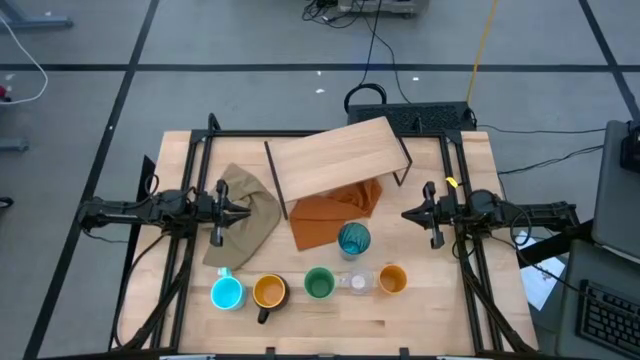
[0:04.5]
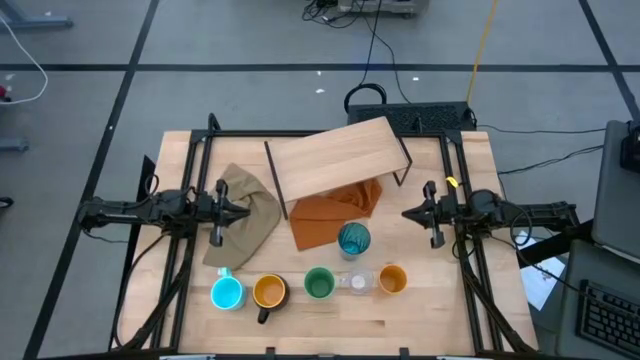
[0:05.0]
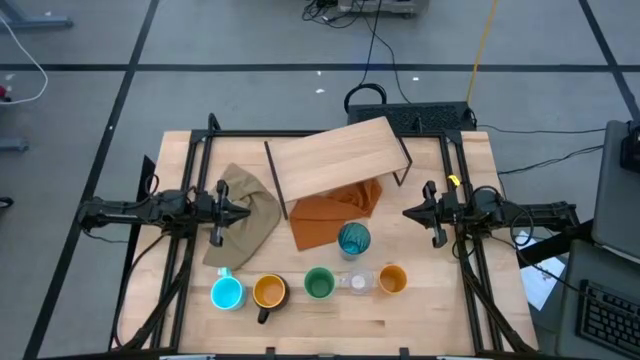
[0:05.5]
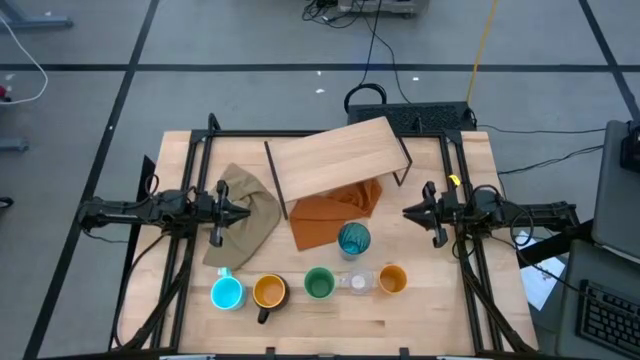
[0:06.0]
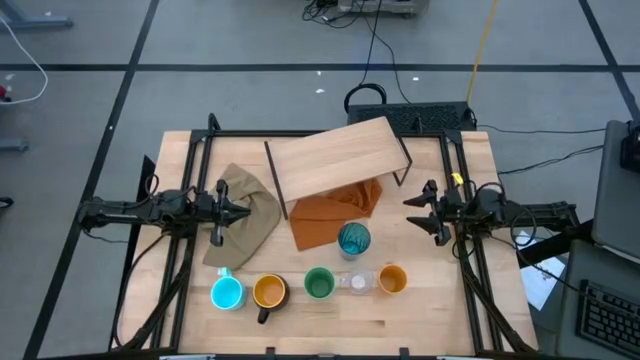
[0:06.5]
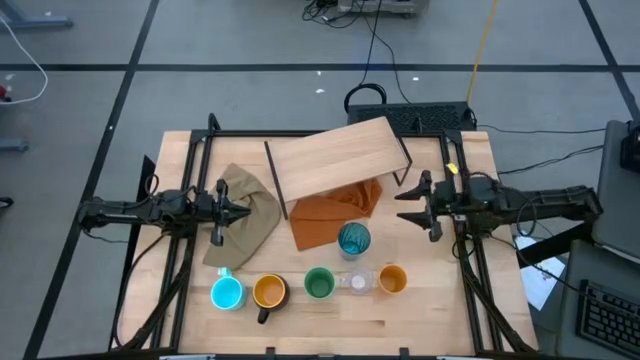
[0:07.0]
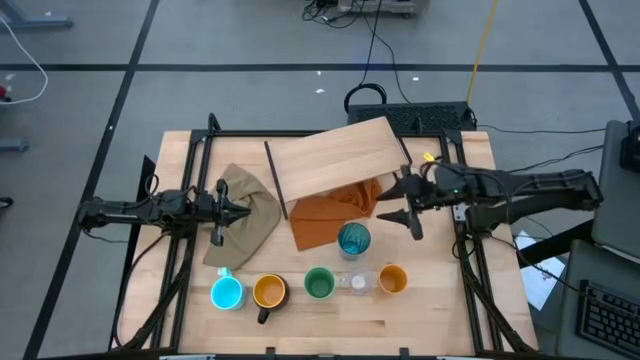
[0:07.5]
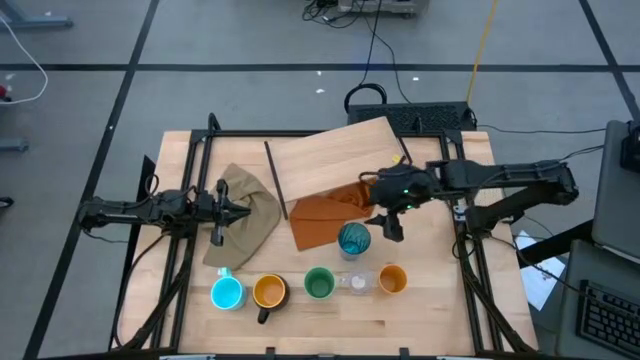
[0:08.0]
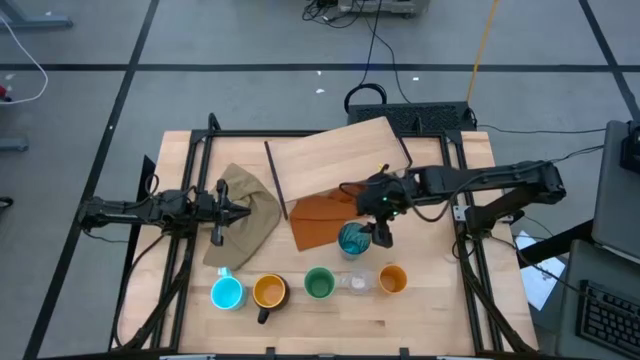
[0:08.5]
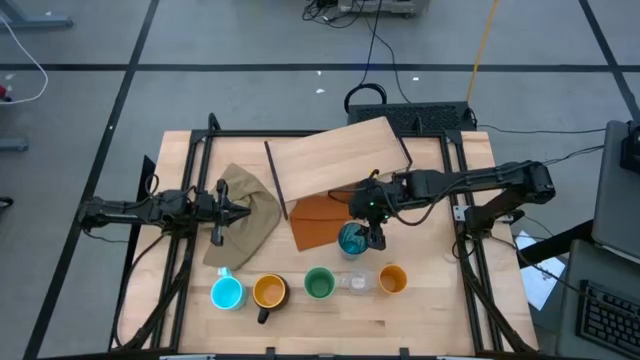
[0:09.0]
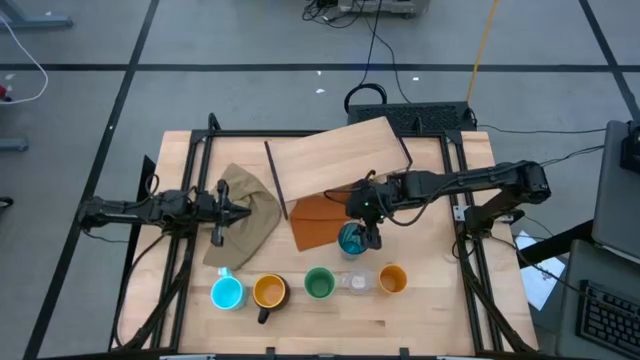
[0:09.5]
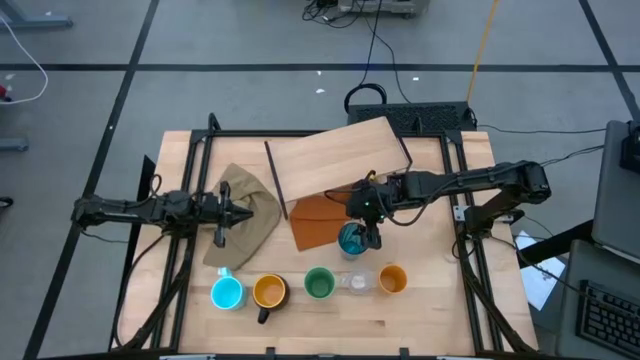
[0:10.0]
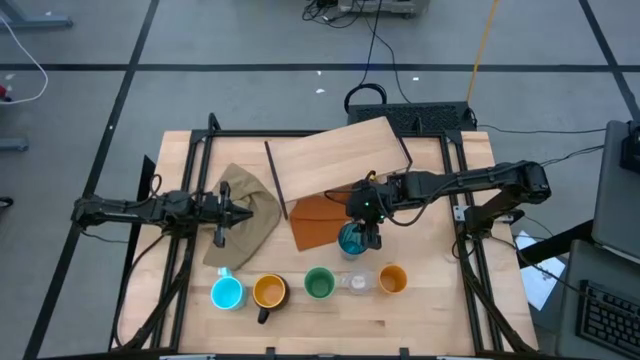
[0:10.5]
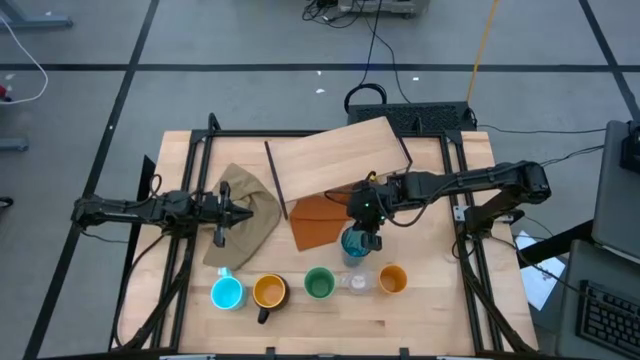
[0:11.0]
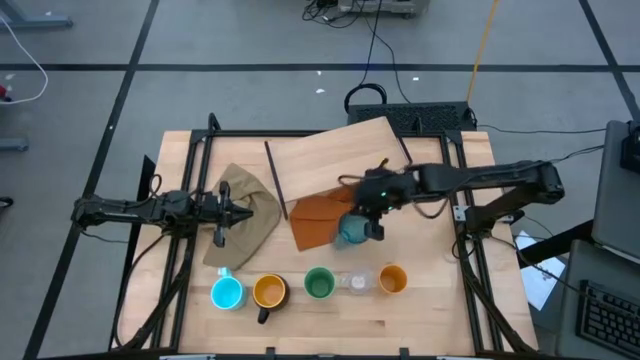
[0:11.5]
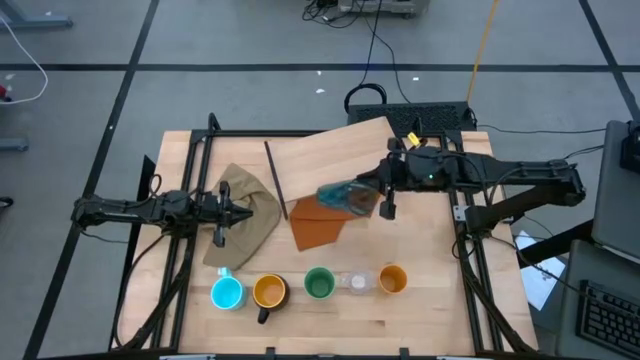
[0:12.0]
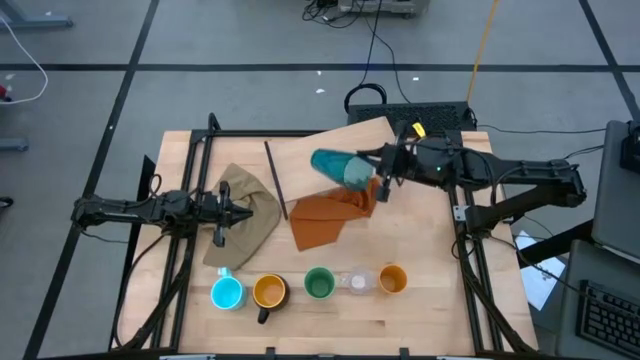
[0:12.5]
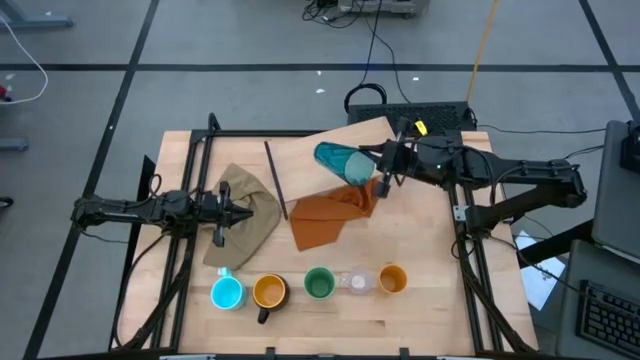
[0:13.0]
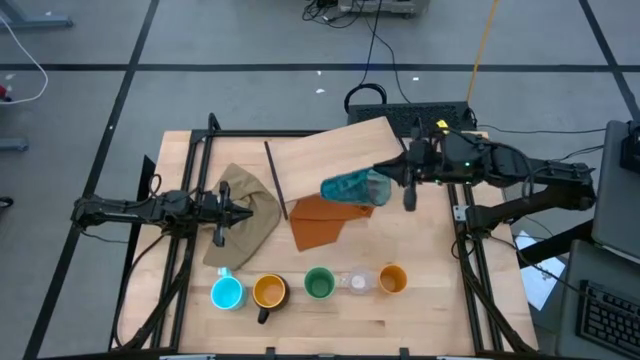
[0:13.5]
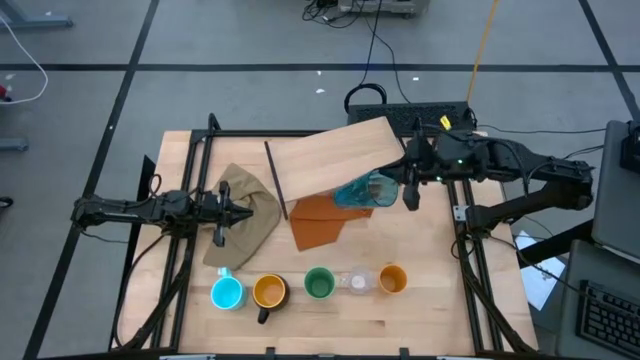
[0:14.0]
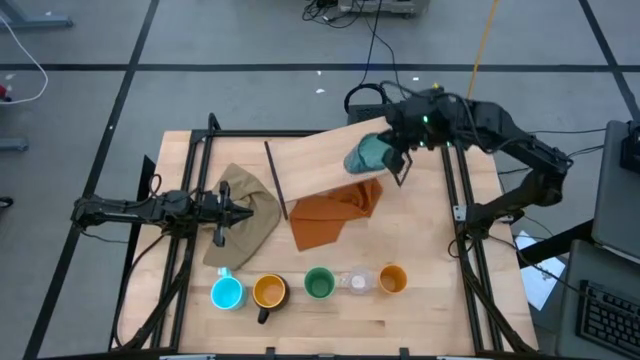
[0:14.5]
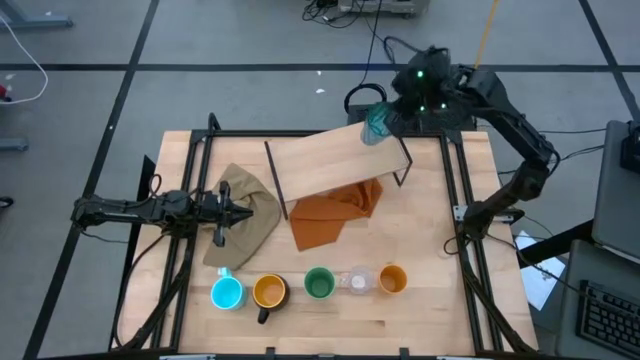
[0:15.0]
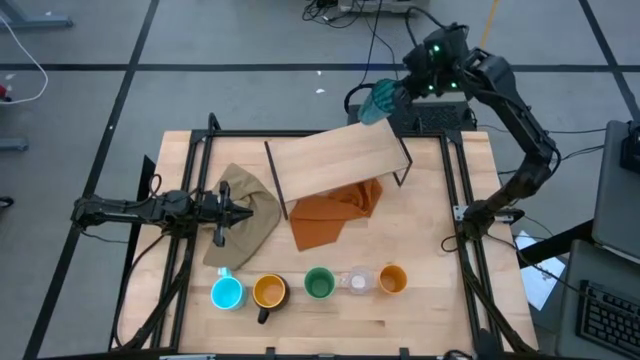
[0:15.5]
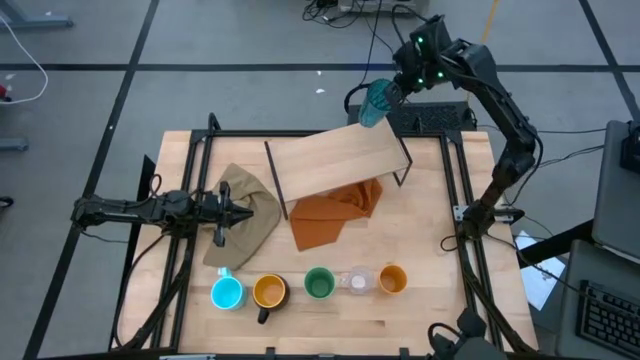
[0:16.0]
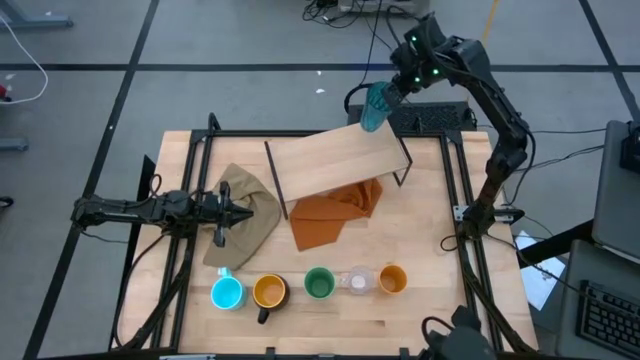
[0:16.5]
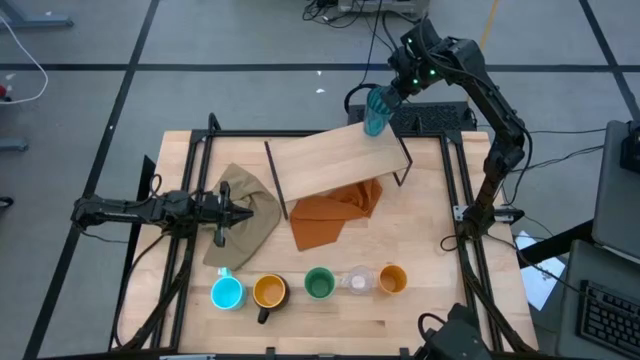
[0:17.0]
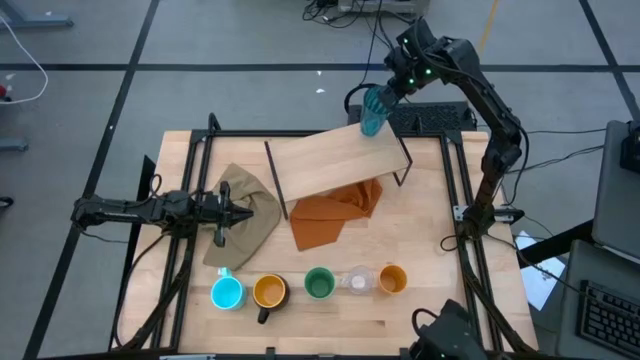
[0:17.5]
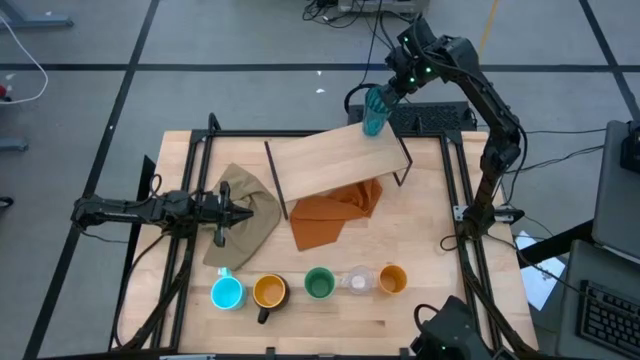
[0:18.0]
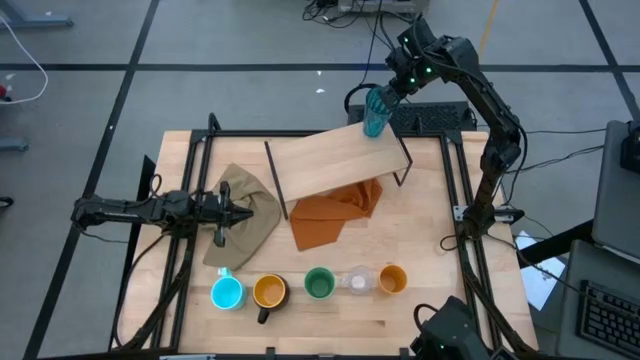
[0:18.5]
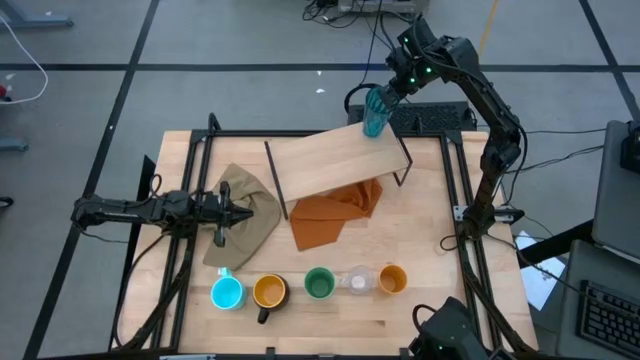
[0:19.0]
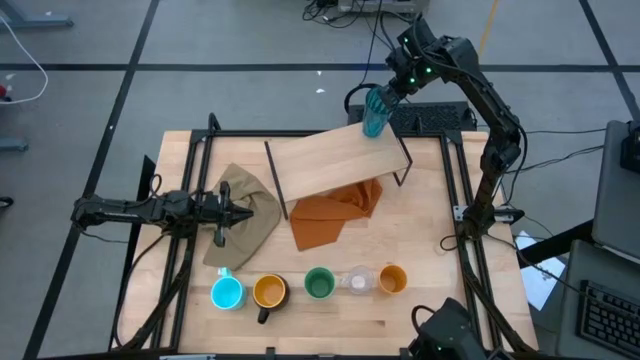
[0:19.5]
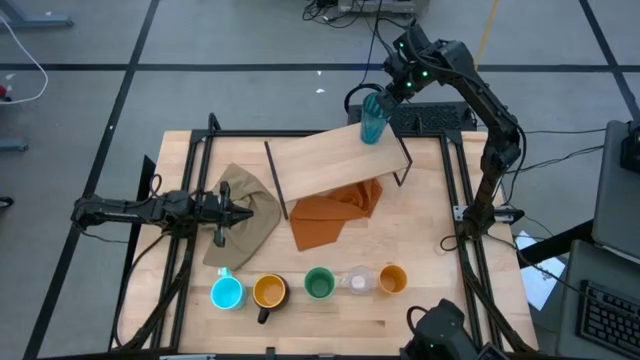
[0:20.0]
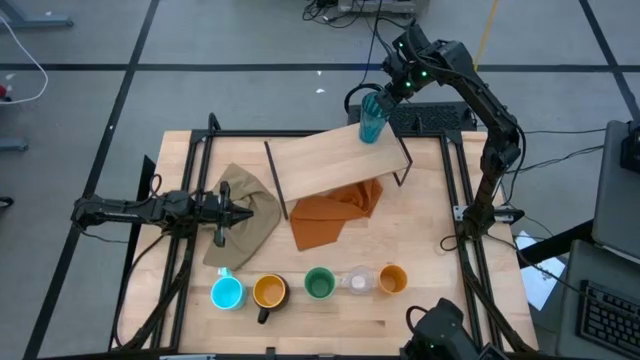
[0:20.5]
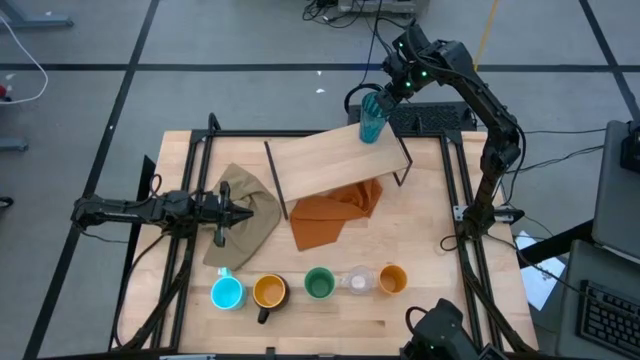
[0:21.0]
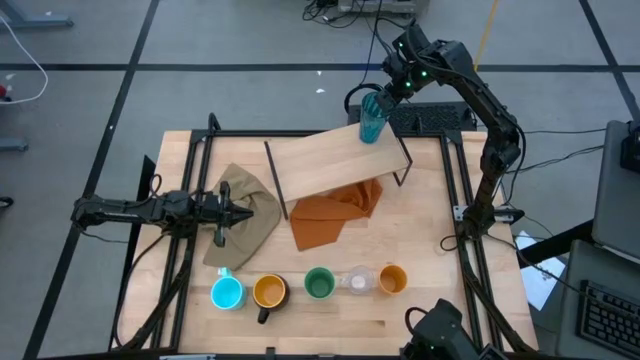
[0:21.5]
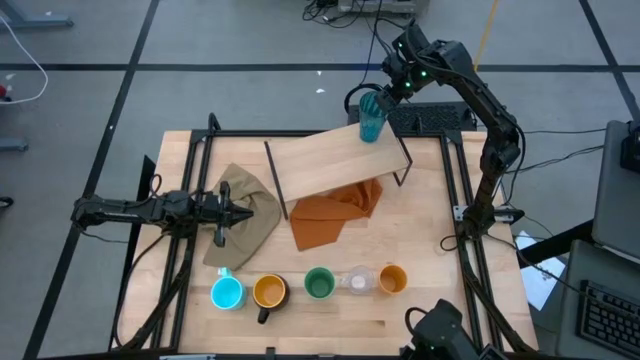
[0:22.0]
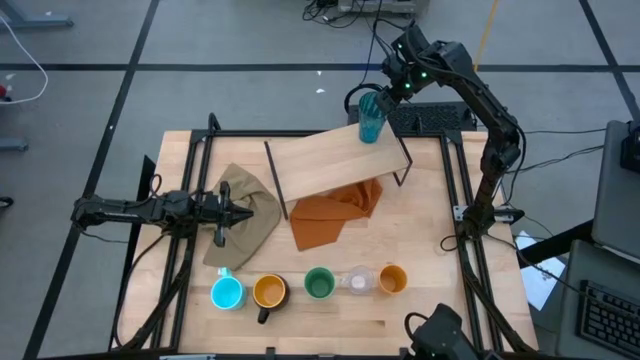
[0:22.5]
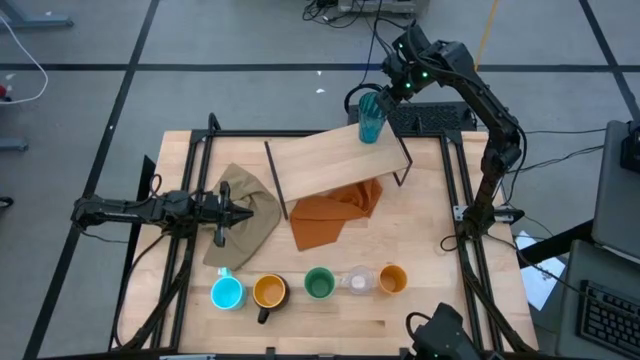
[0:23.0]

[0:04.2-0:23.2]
Task: Stack small to large cups/mugs on shelf
Put the blue glass on the shelf
